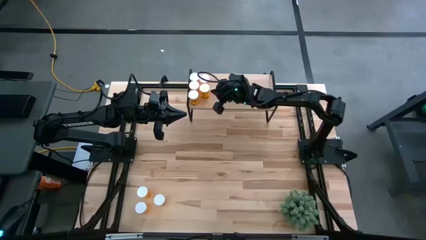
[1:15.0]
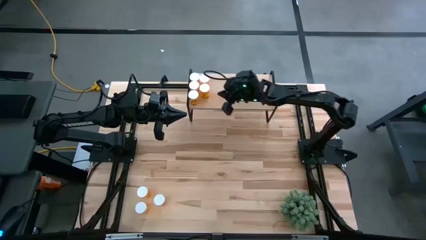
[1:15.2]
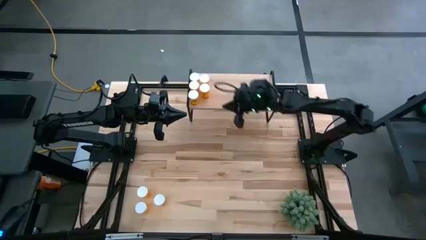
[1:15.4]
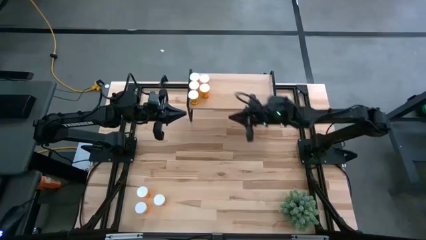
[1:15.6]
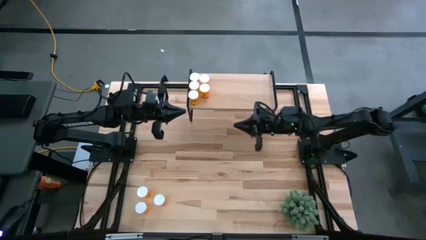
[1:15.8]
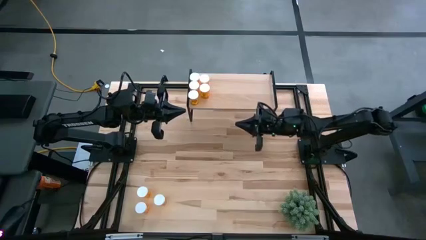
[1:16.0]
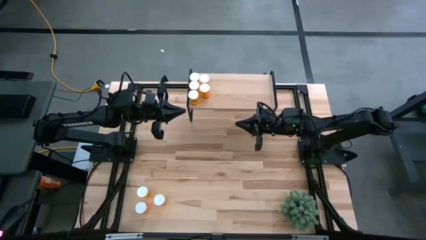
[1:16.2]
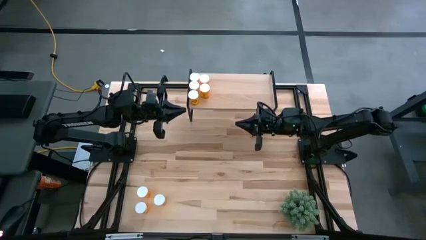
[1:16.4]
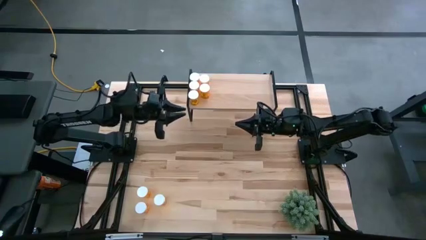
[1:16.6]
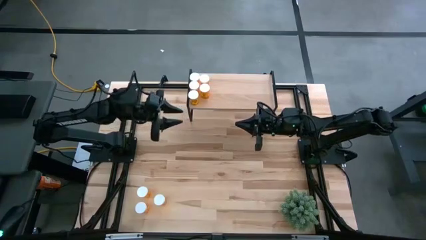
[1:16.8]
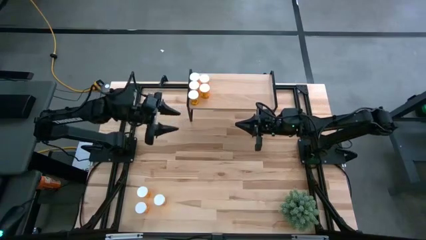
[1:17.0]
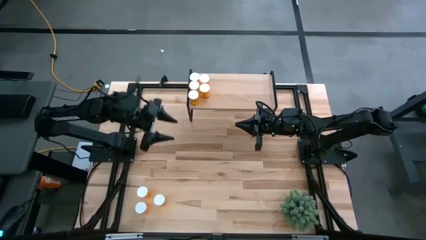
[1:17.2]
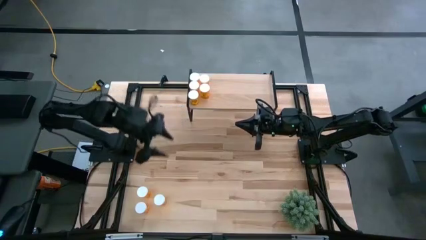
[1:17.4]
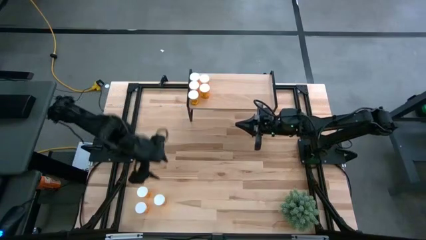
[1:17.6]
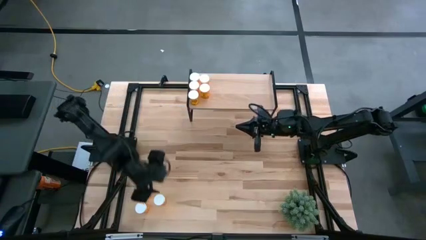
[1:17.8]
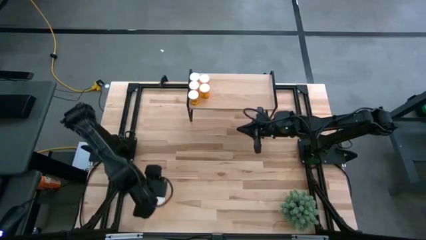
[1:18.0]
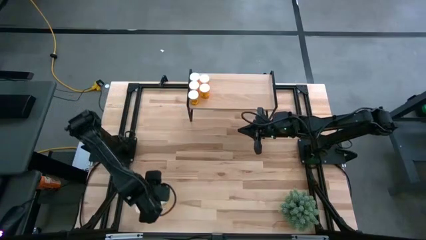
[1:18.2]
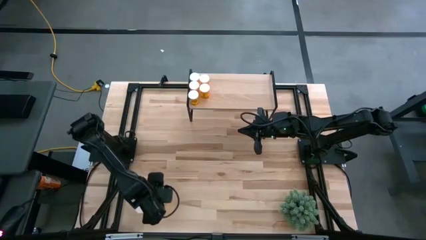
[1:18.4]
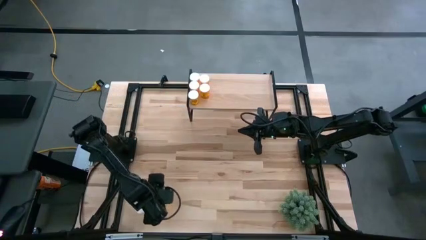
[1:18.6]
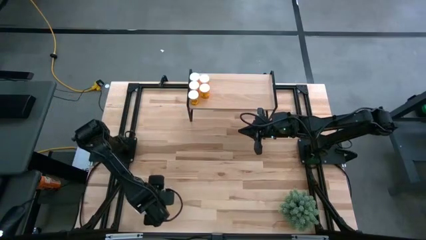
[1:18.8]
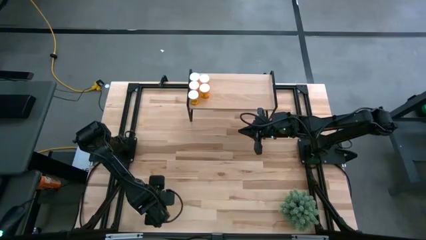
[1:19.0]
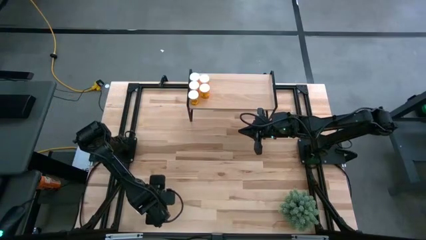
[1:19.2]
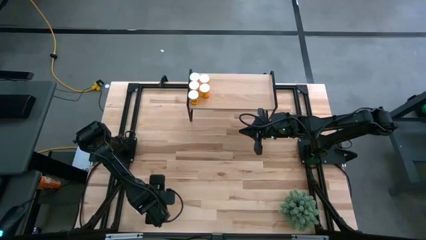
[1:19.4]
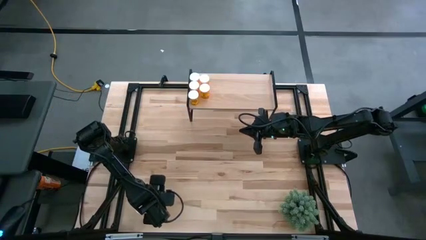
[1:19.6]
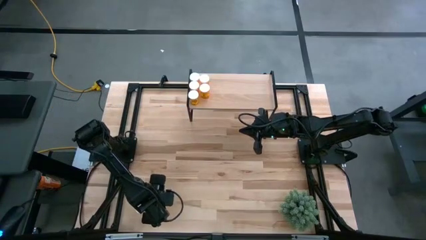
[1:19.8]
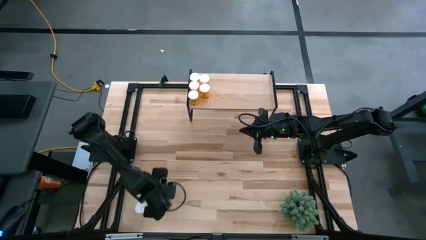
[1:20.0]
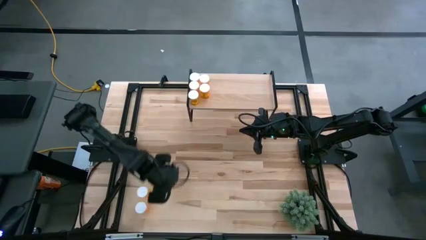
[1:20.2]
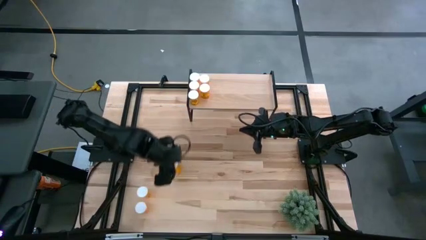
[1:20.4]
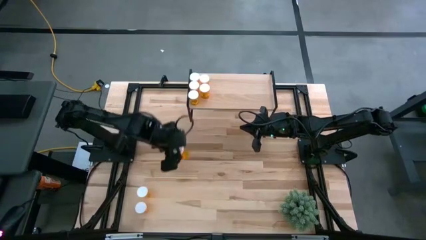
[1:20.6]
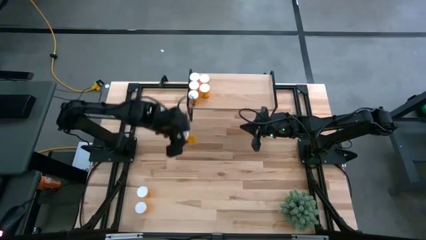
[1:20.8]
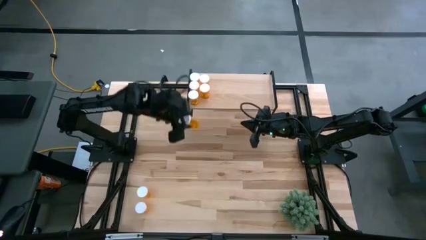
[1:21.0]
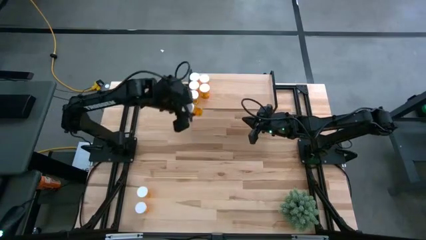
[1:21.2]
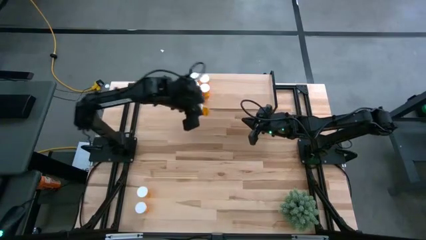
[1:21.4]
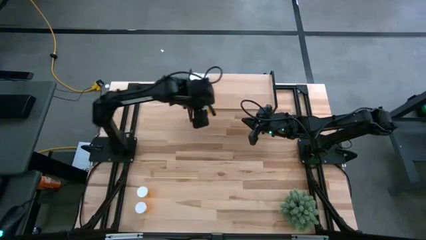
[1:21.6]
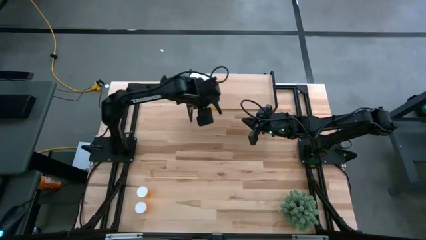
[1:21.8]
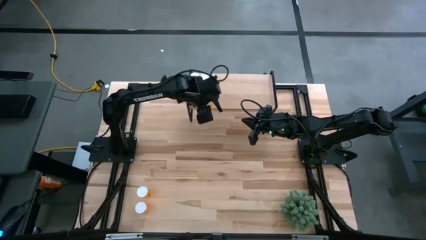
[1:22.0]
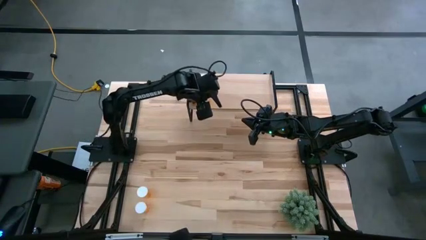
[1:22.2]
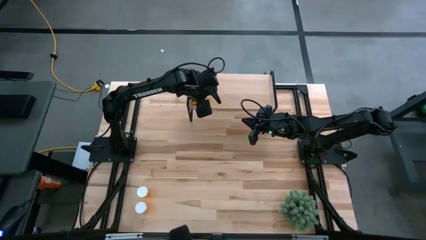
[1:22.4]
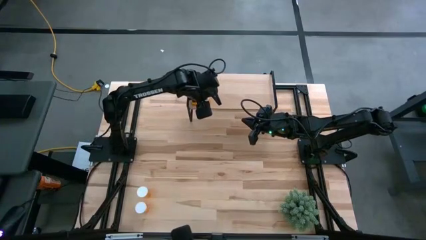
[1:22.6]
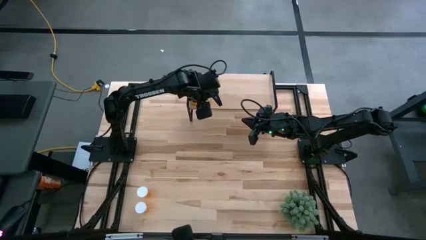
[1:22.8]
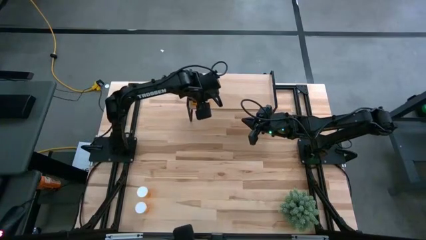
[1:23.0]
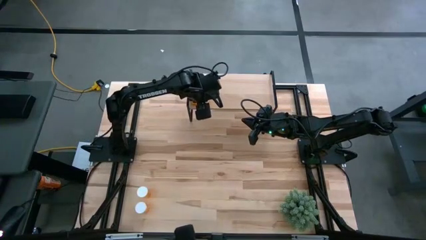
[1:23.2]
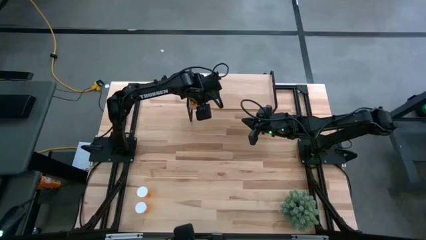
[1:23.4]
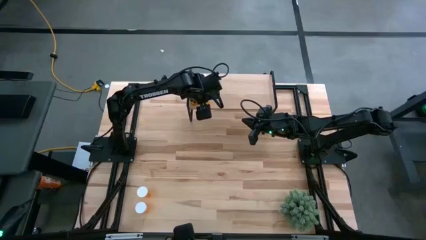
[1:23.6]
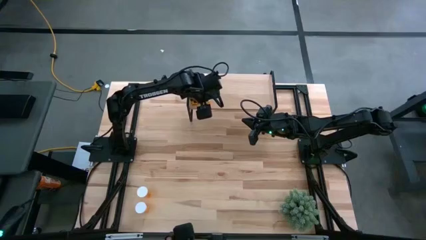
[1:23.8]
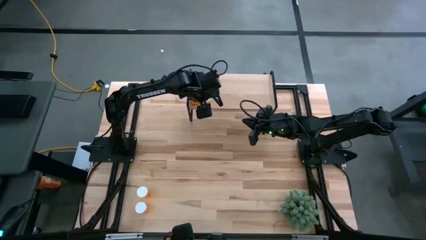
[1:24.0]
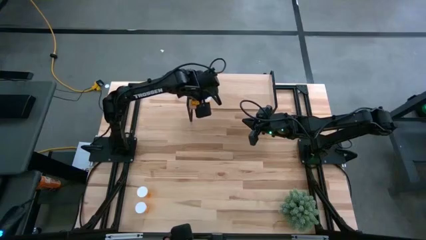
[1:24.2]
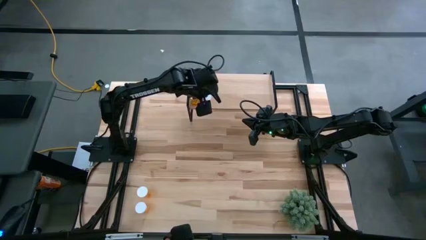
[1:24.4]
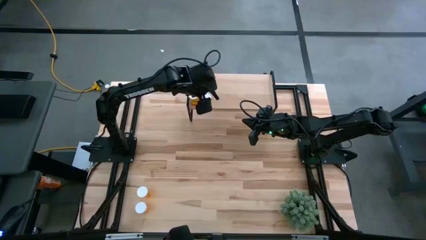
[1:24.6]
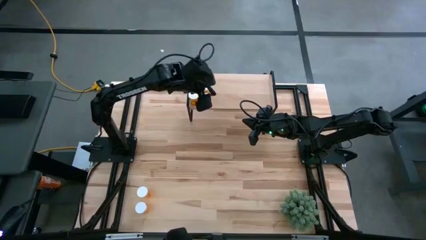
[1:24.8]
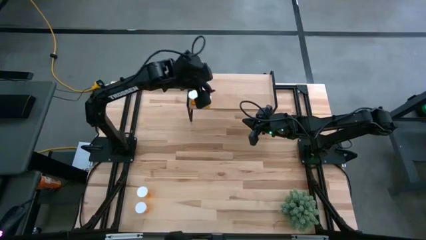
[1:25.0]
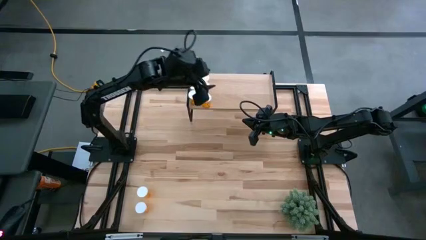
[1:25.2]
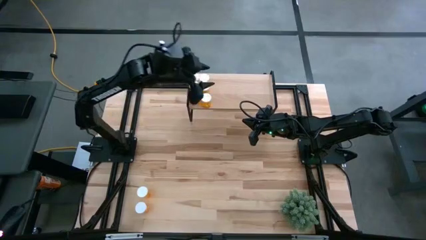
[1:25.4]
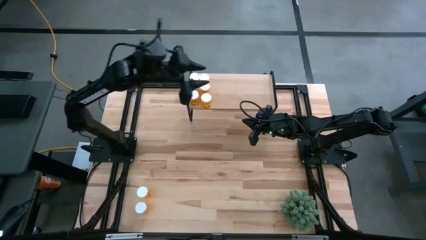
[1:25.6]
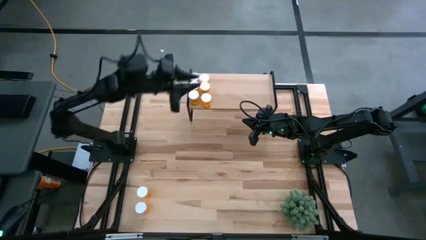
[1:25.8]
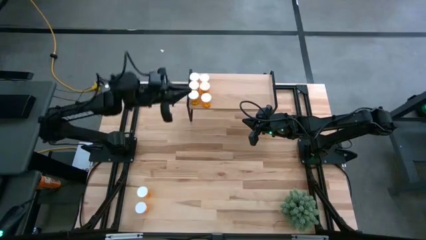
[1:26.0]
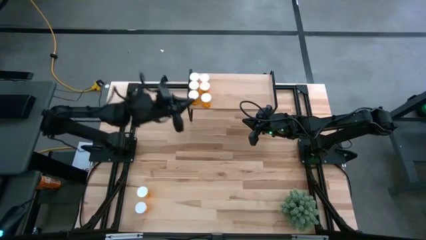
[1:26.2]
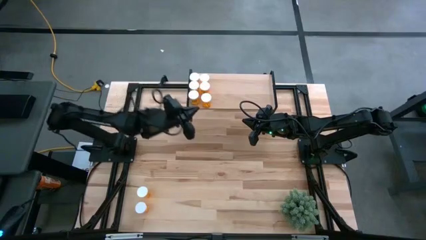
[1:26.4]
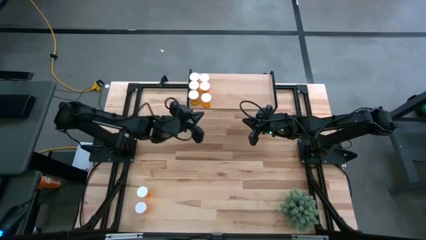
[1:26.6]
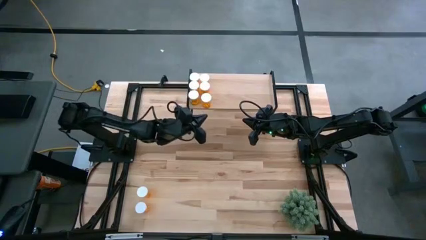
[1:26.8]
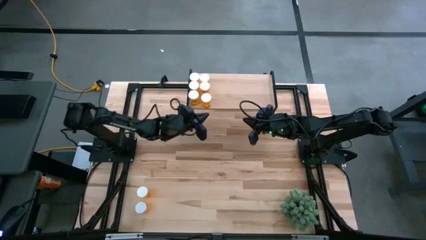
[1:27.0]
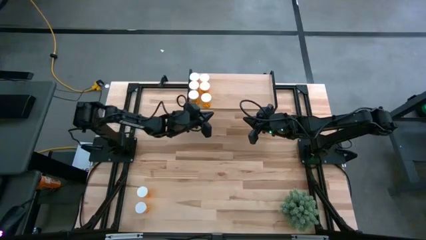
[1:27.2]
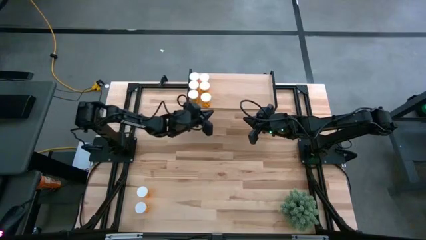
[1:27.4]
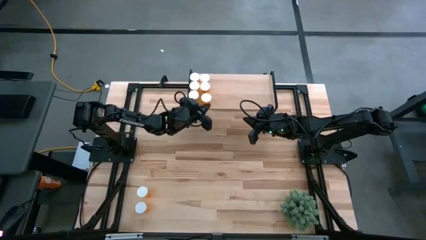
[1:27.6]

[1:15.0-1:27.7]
Task: Pick and place medicine bottles onto shelf by color
Put the orange pill bottle on the shelf aligned with the other orange pill bottles
